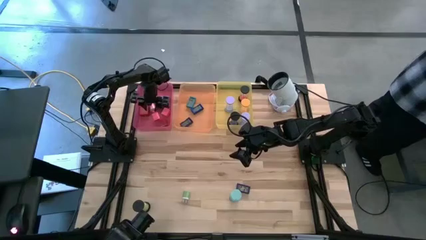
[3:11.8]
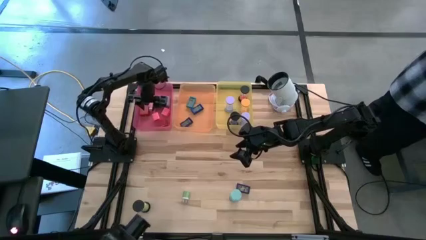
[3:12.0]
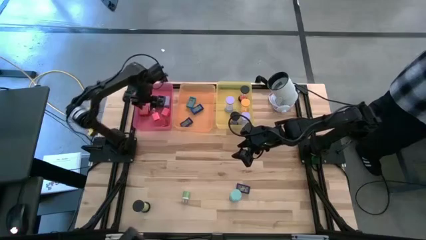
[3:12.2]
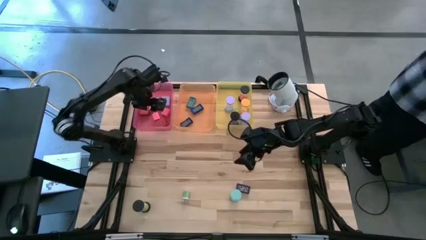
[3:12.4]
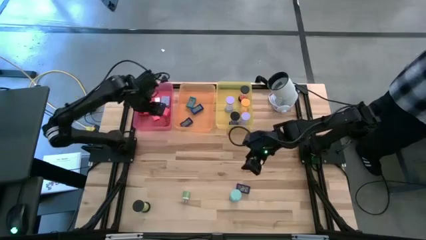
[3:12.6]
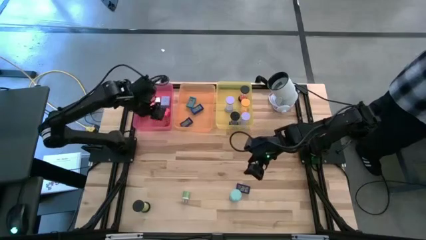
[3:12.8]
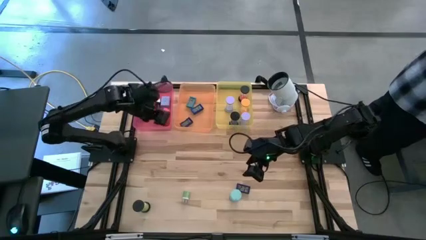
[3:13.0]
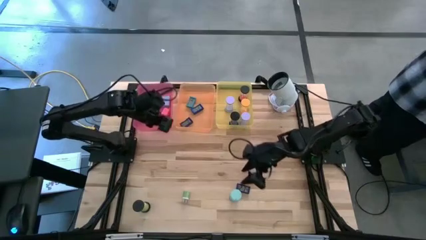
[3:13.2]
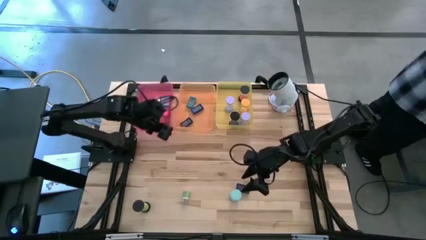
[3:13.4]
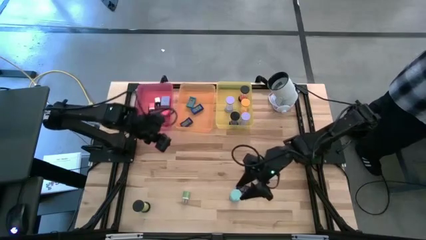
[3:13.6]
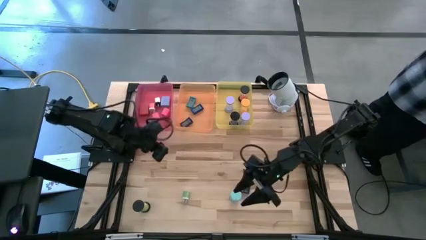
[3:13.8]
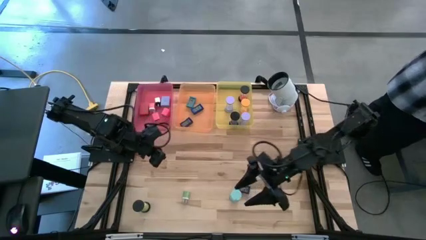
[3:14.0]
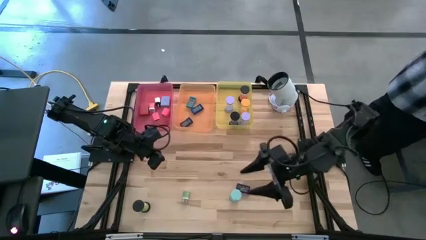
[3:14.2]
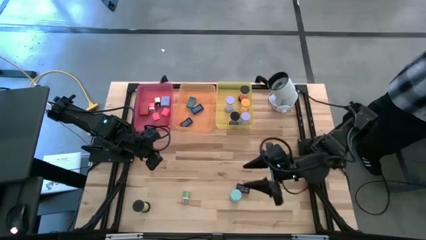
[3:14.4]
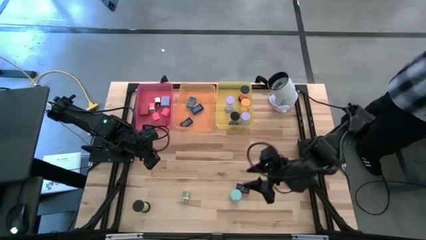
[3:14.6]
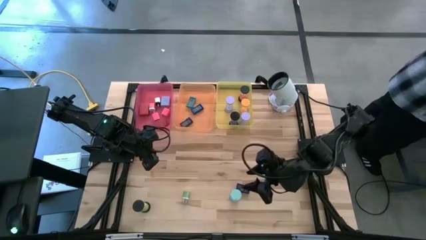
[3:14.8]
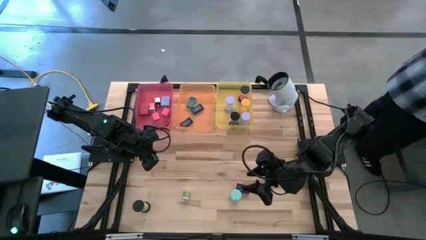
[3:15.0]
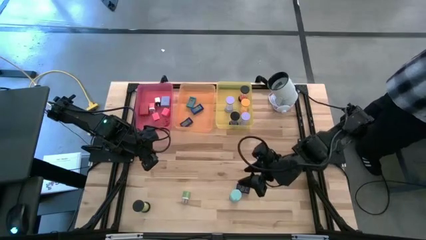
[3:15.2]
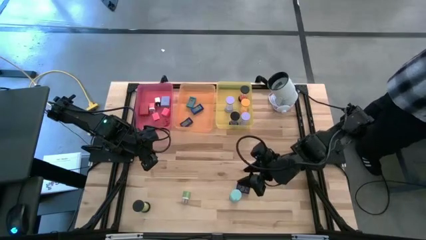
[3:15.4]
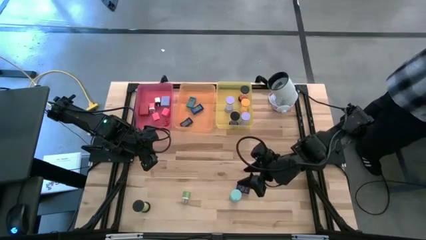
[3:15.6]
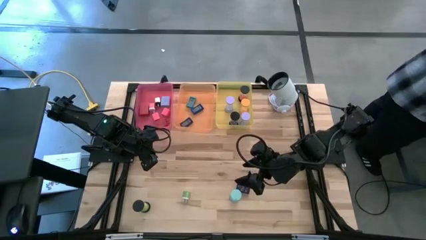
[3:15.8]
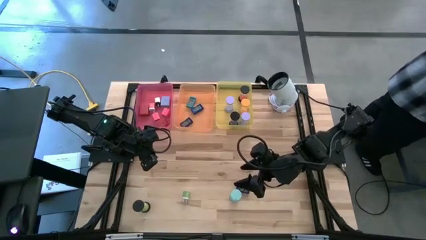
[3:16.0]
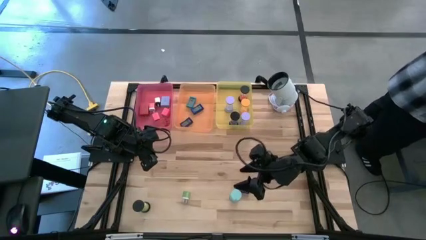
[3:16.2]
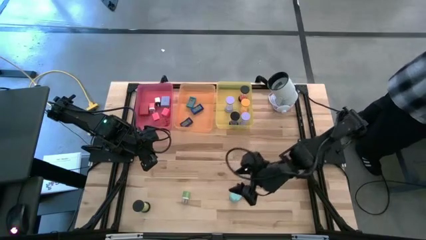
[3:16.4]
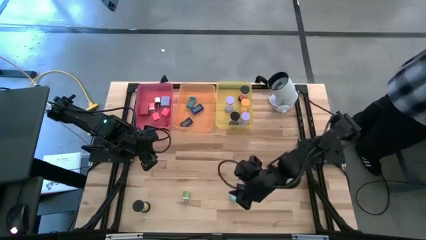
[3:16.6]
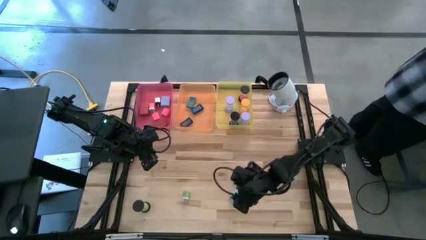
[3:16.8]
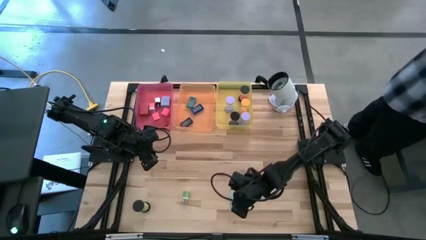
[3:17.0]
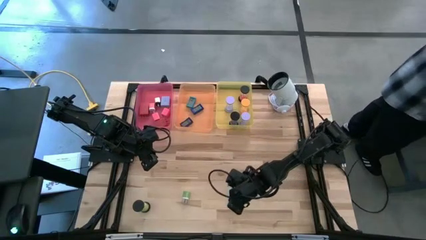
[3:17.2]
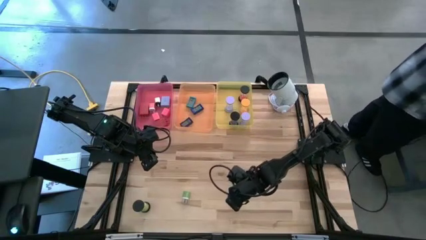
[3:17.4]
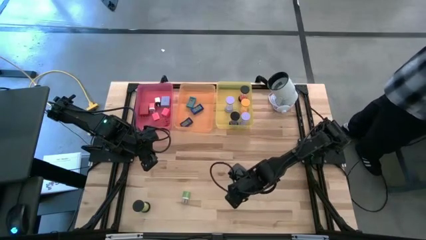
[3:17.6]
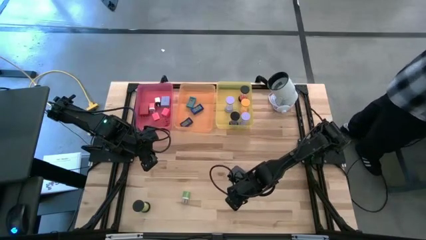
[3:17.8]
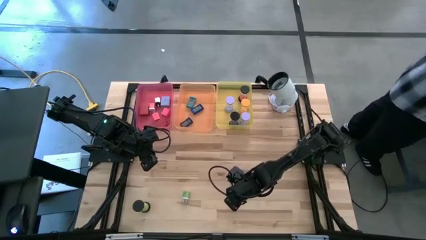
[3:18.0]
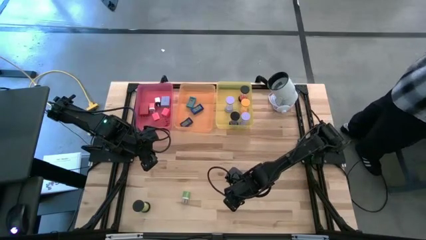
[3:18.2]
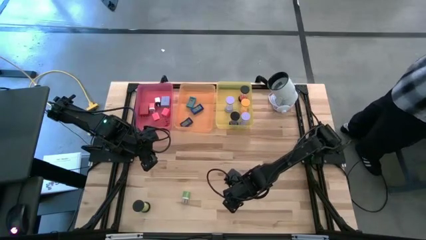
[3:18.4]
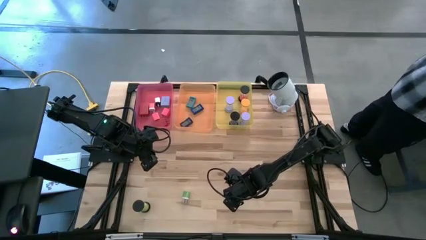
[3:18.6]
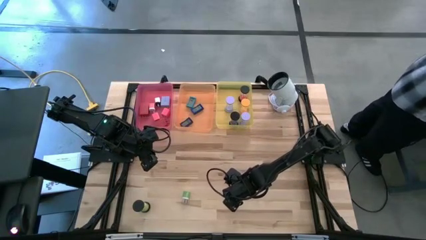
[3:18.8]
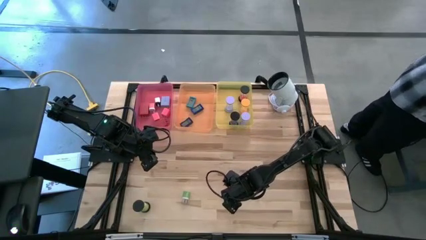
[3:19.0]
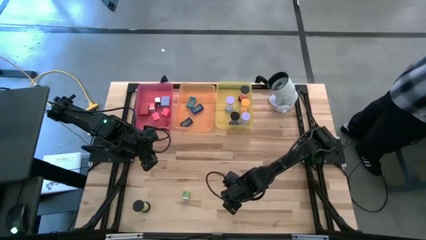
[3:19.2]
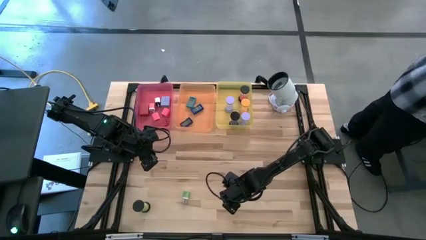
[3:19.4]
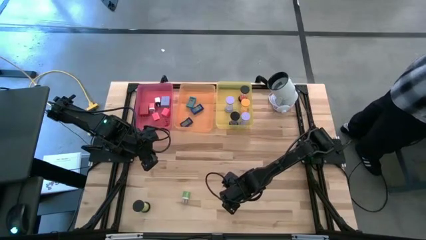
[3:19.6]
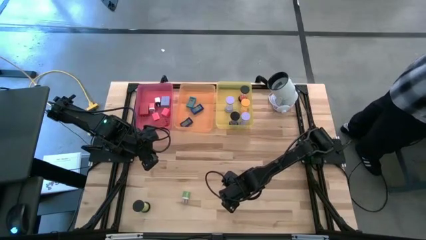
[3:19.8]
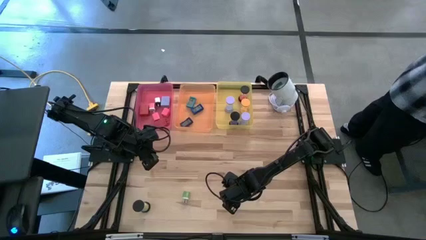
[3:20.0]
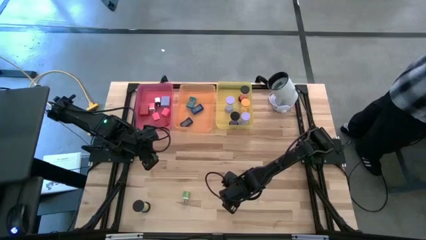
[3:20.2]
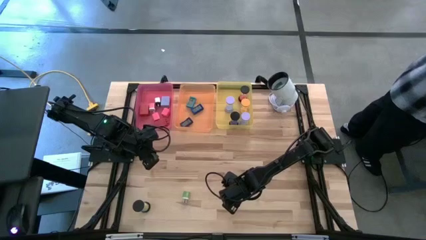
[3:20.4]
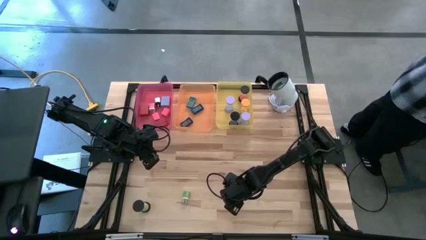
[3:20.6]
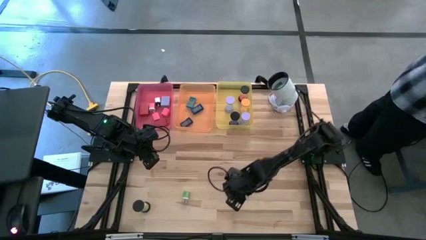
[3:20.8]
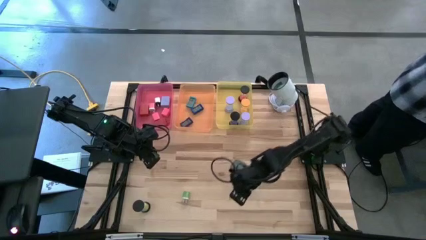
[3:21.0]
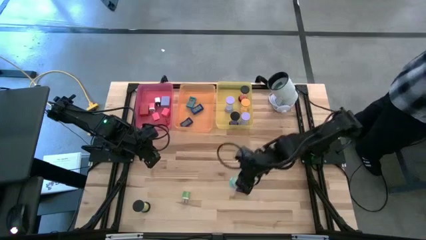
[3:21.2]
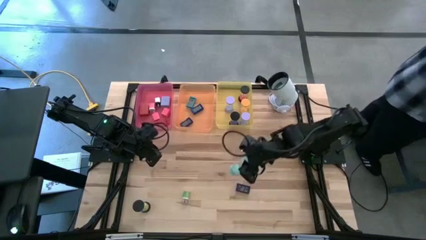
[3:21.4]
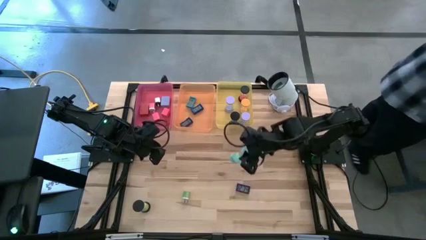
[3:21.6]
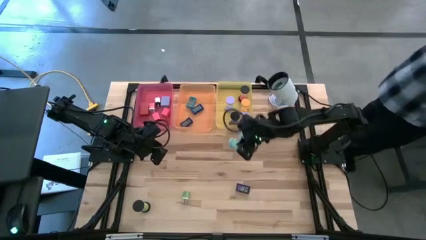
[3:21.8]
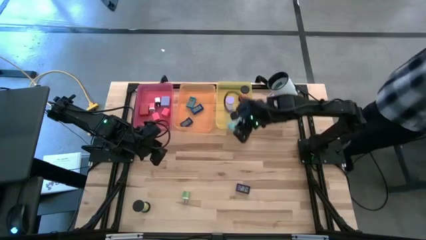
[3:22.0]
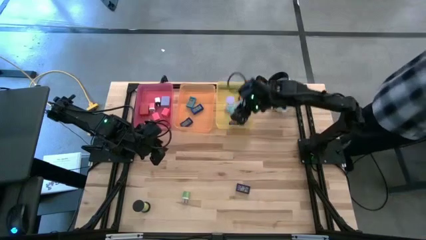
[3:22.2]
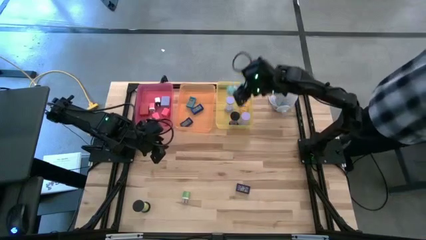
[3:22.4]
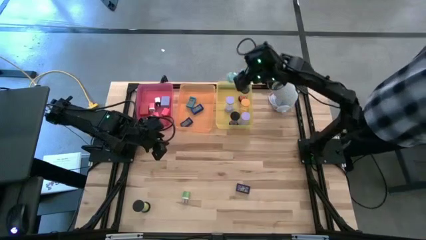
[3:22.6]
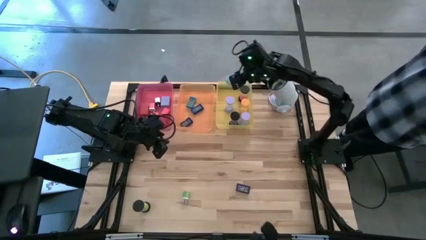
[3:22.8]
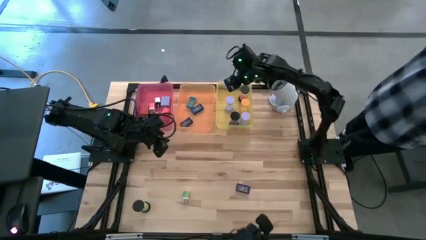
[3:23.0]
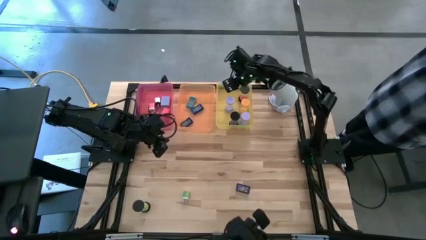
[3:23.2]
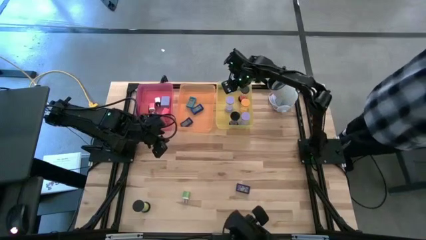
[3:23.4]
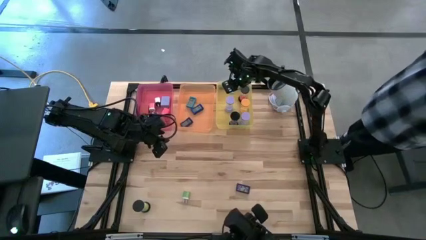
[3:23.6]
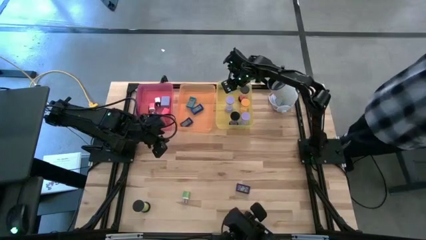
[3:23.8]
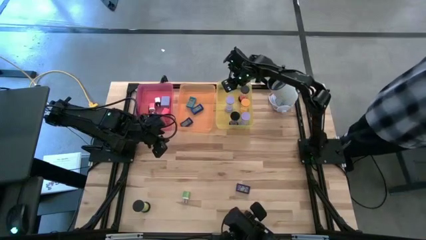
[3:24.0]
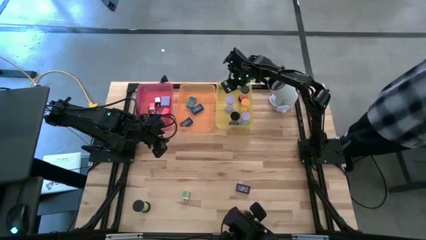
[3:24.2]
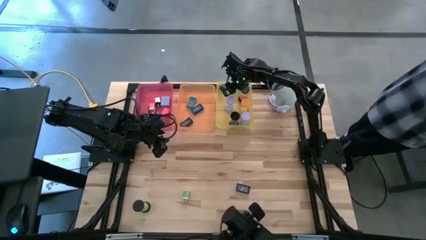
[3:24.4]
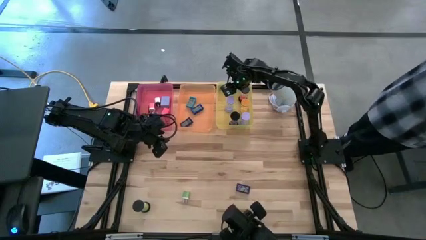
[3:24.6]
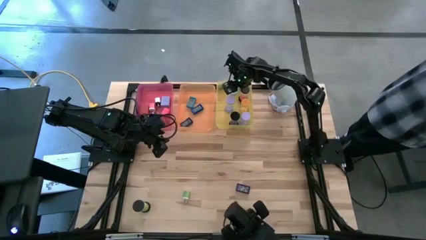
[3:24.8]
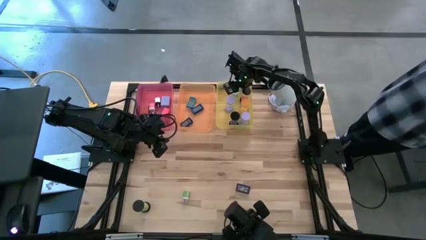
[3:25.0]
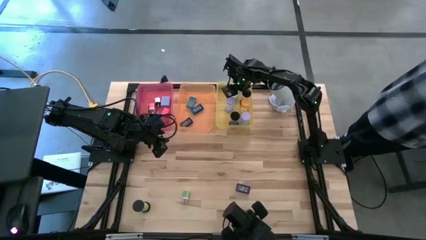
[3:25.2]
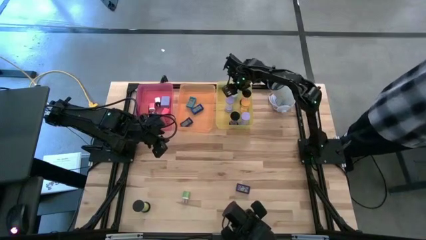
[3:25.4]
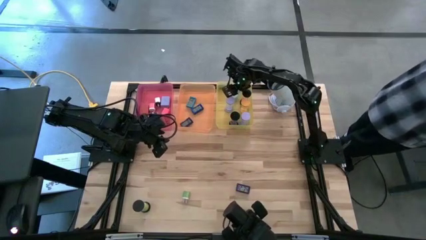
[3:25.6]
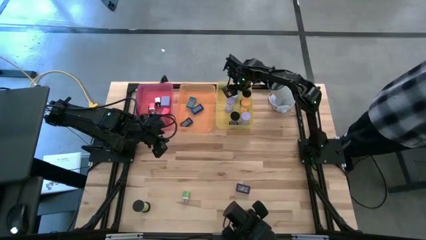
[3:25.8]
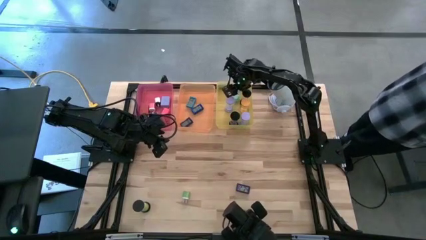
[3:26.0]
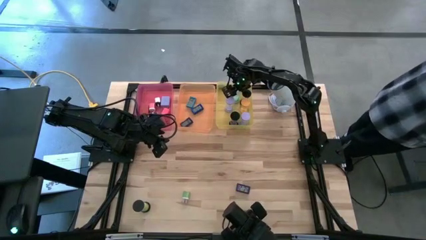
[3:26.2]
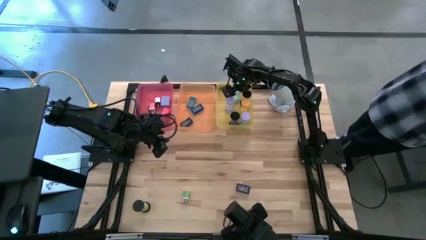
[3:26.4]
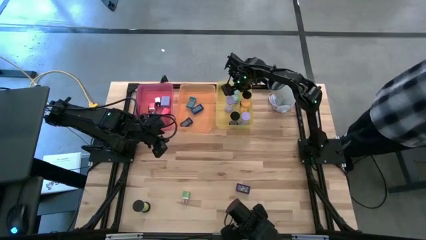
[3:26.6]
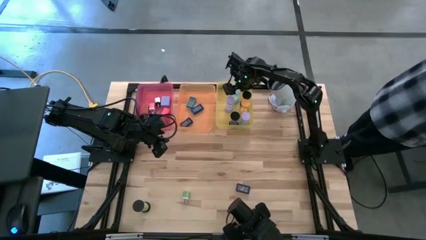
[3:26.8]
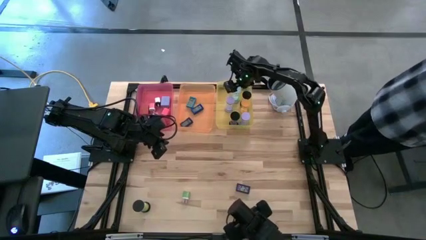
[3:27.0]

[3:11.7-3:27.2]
Task: Pick & Place Office items
Put the light green hourglass into the yellow bin

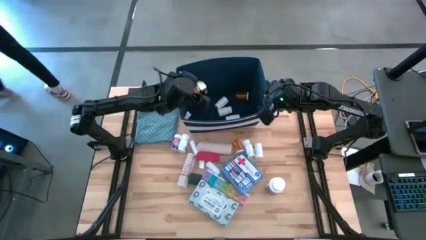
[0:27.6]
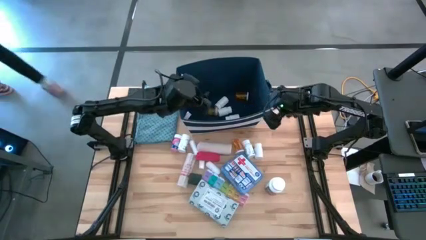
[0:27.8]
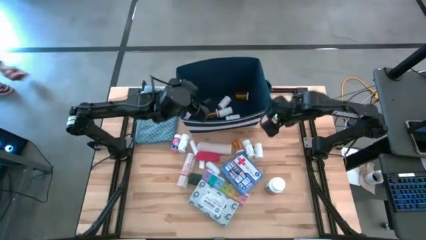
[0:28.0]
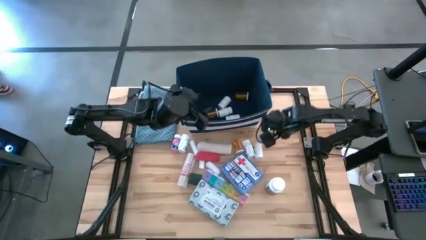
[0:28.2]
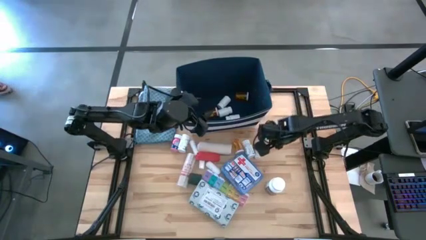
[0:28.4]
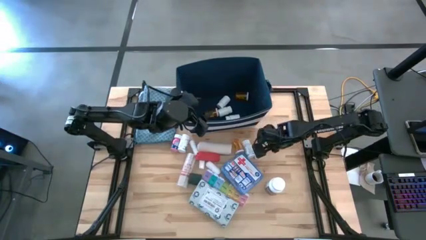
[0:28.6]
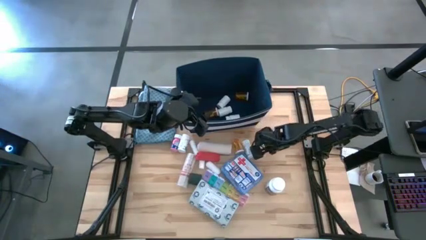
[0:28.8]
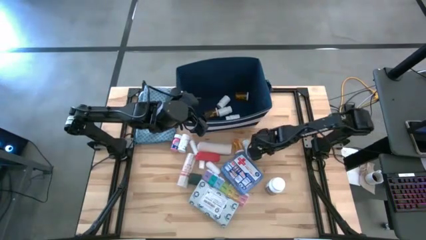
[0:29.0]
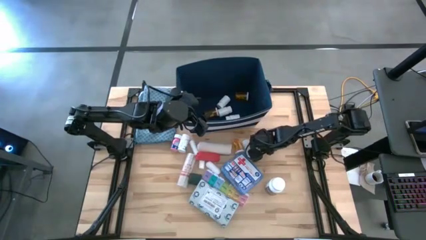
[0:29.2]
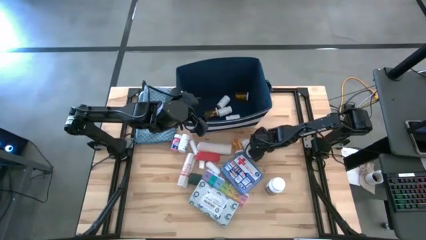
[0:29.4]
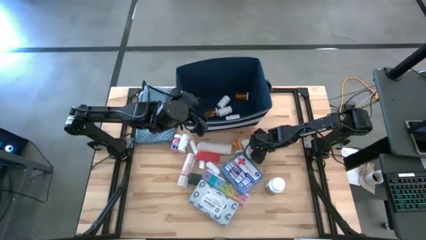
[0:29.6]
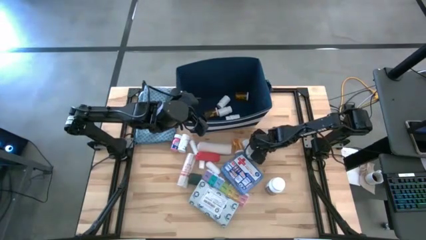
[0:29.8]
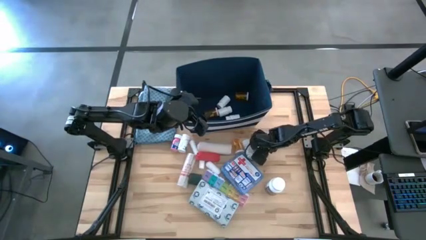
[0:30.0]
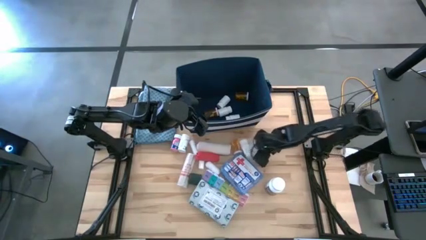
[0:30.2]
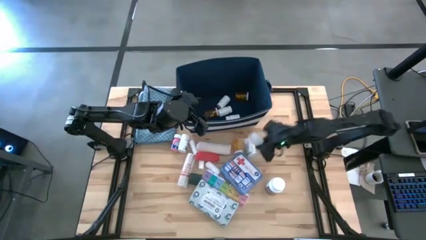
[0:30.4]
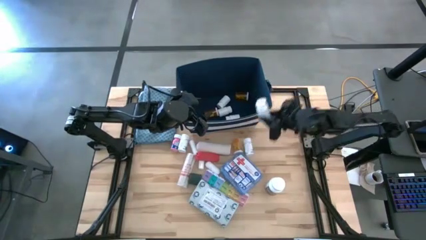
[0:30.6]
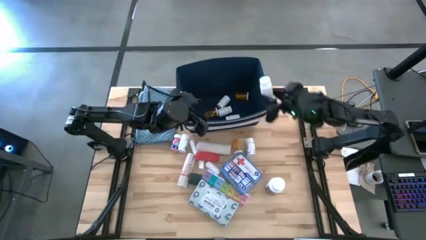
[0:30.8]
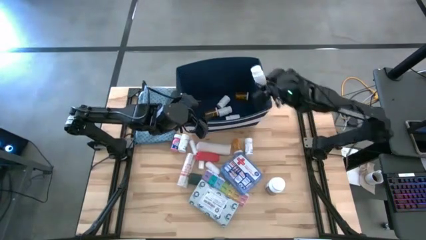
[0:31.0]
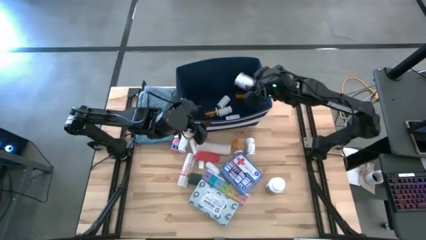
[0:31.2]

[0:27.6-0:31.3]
Task: Pick & place medical supplies in basket/bin
Put the white pill bottle into the blue bin
